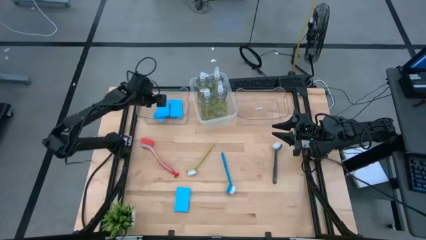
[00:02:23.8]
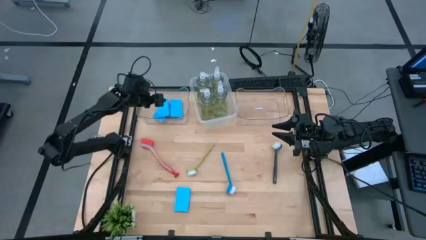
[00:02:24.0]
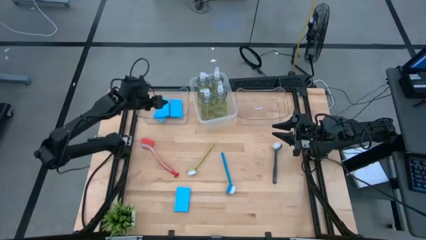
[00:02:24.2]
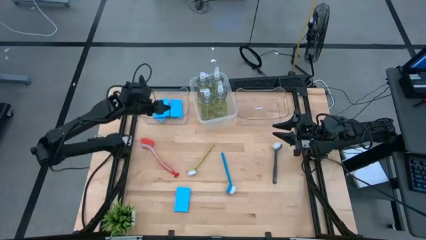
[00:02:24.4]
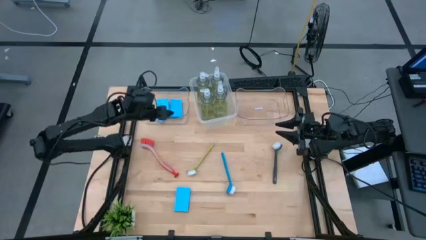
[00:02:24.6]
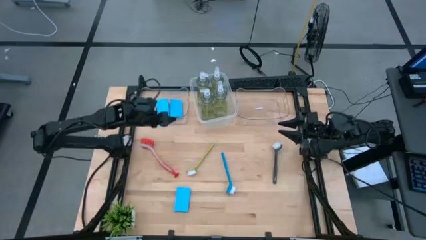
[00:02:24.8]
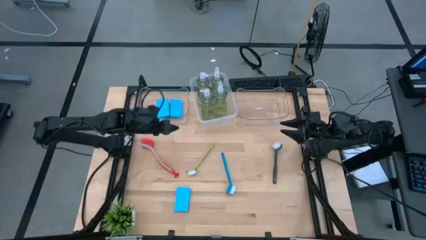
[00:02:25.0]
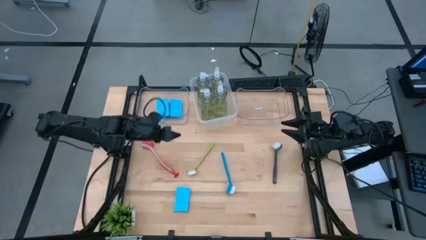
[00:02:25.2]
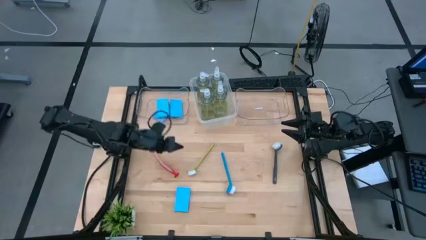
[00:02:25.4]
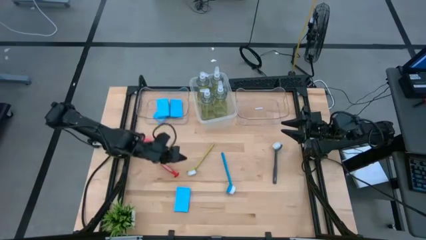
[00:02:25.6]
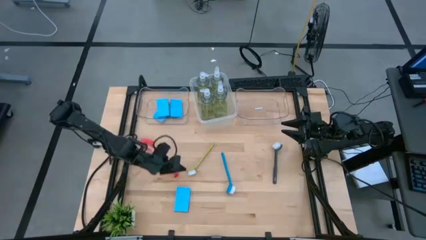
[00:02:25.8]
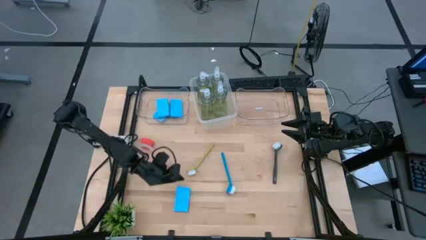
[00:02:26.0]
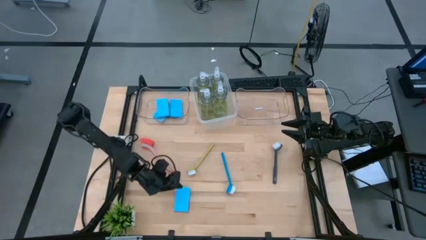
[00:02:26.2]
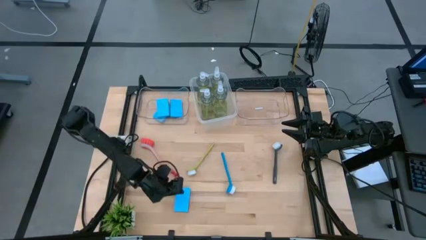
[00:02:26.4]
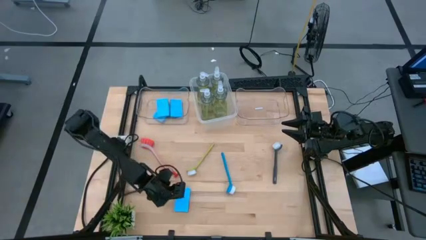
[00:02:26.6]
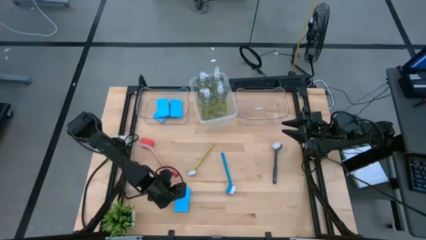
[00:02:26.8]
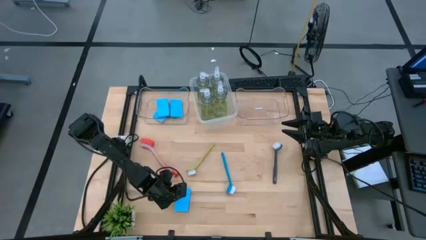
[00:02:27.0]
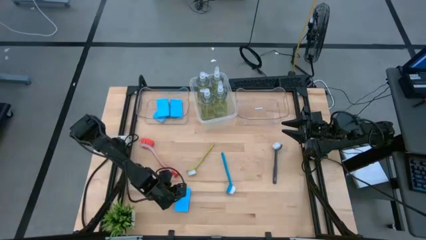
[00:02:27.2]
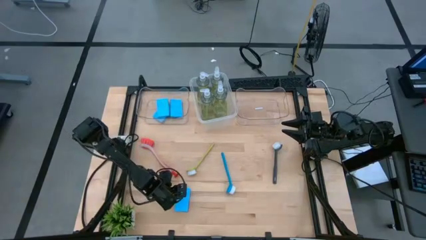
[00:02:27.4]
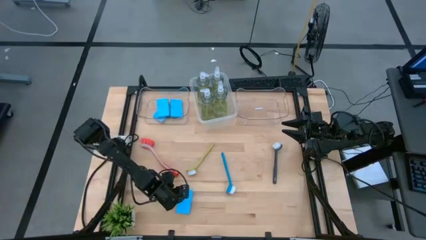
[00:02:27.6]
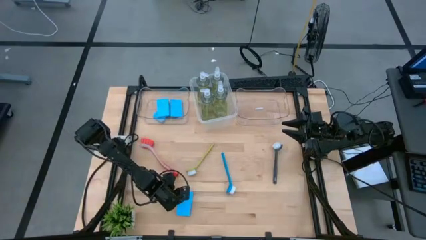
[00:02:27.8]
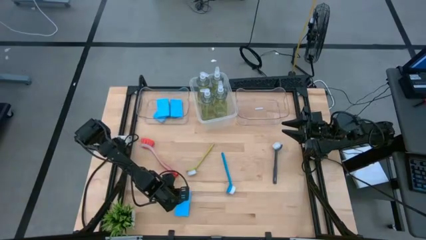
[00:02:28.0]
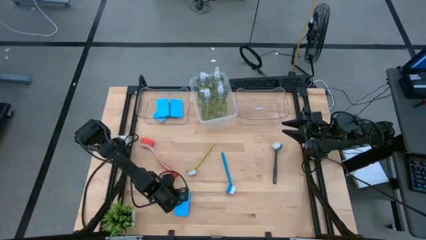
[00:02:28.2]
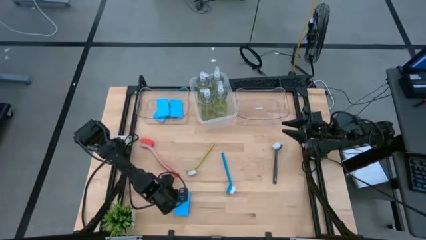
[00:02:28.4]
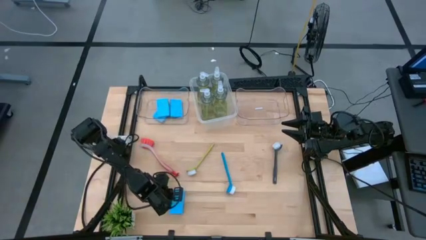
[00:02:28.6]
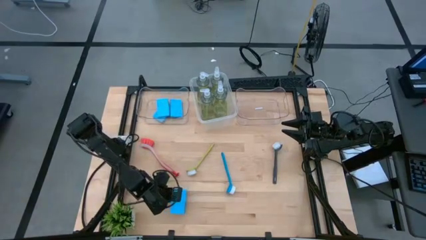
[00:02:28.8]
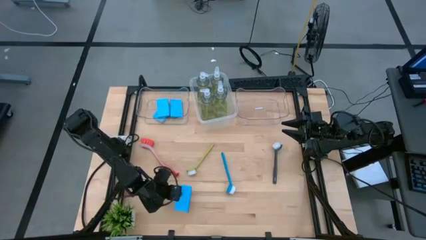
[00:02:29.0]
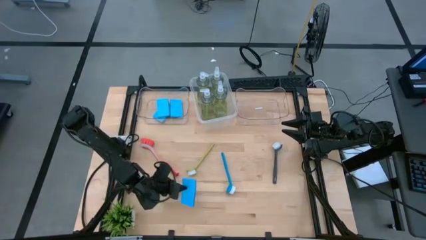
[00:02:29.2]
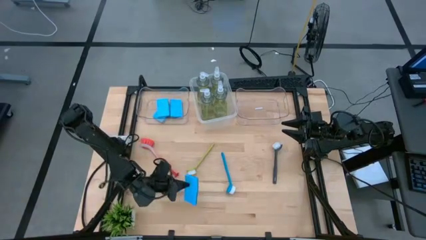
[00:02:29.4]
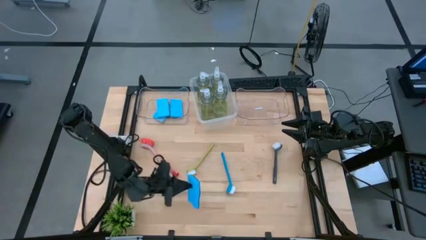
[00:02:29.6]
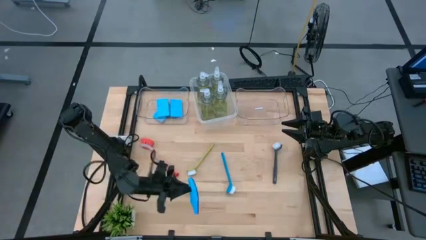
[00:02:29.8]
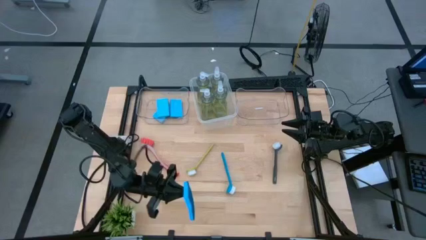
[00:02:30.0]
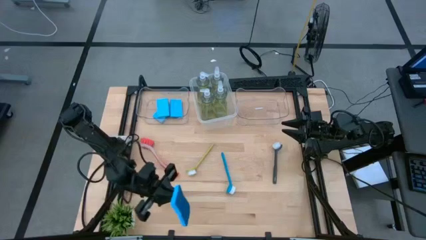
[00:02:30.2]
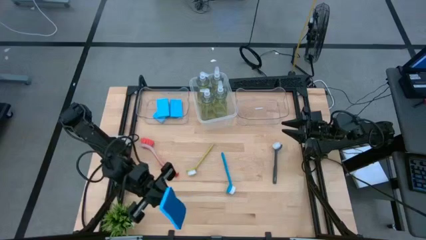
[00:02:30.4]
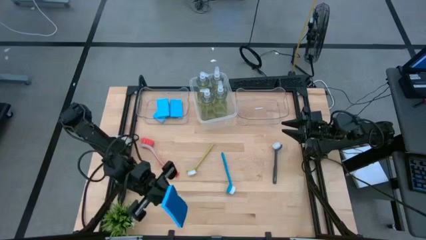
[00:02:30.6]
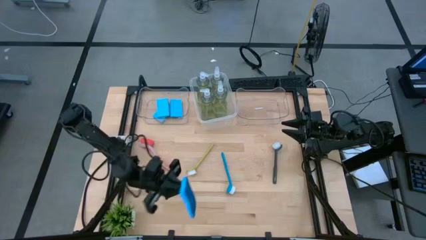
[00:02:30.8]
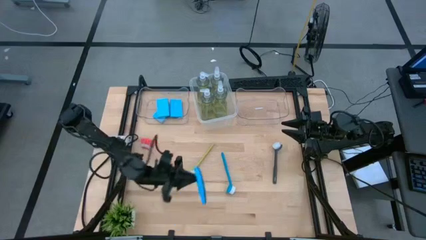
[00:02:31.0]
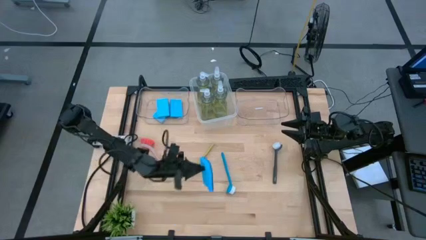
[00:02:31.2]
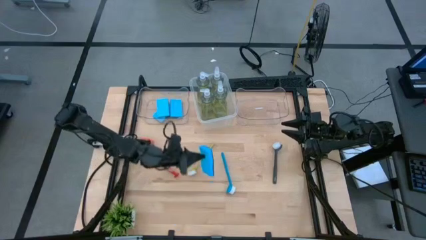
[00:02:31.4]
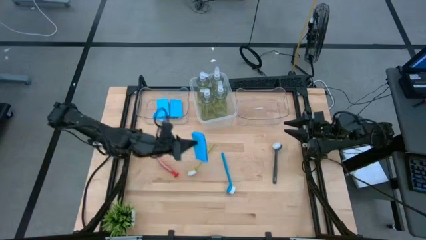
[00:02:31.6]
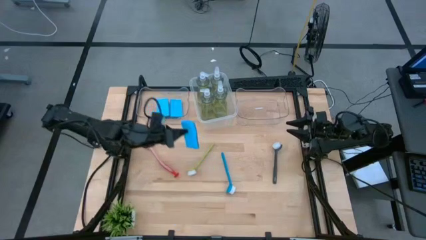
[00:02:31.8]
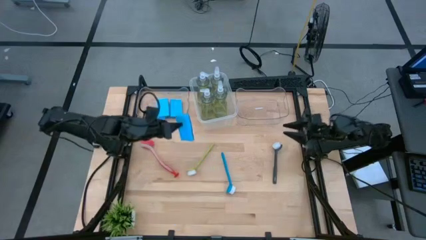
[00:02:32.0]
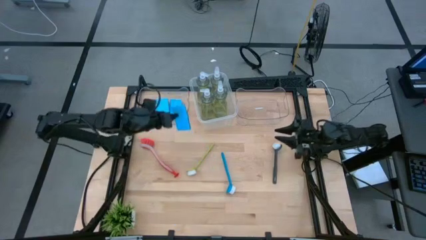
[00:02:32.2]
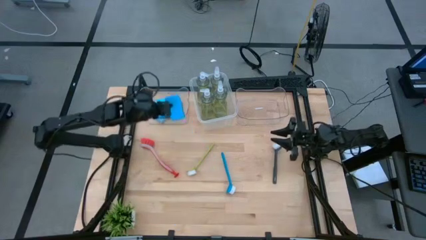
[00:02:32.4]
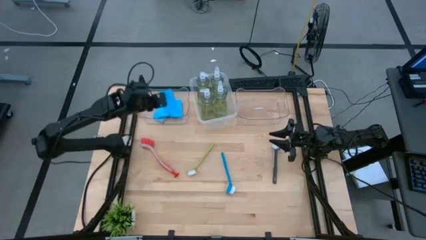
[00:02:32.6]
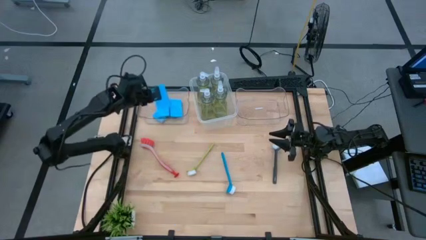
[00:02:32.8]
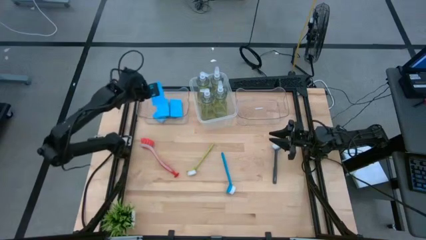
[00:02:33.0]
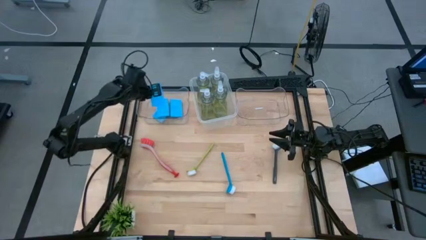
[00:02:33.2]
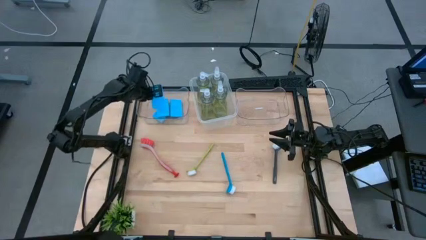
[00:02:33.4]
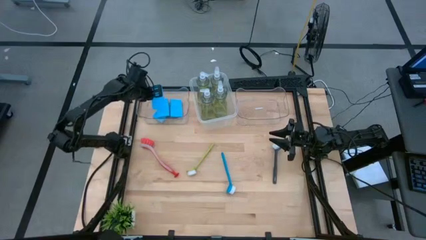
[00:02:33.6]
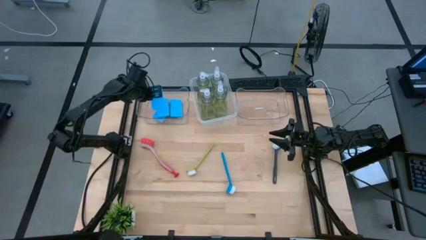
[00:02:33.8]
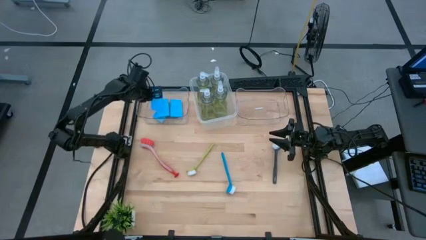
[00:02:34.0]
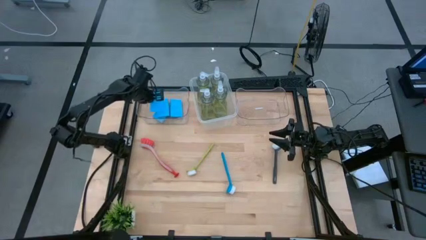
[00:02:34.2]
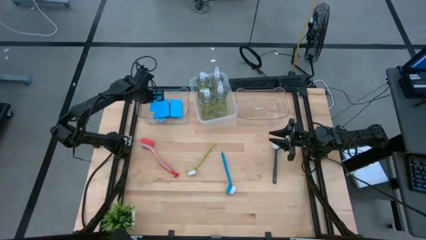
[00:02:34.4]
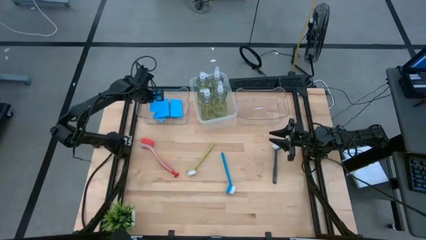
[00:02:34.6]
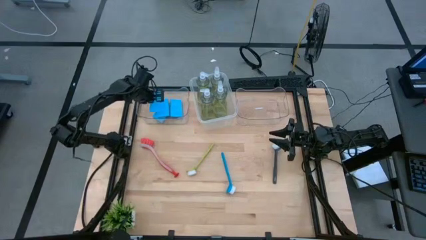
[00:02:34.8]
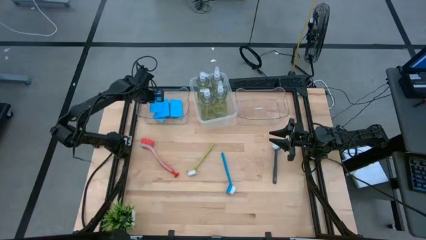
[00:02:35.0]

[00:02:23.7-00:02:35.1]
Task: Pick & Place Kitchen Sink Supplies
Put the blue sponge into the left transparent bin

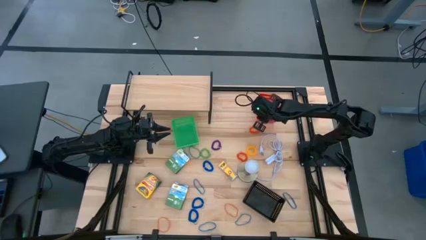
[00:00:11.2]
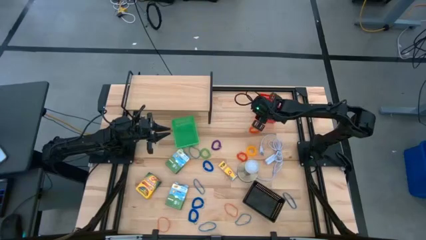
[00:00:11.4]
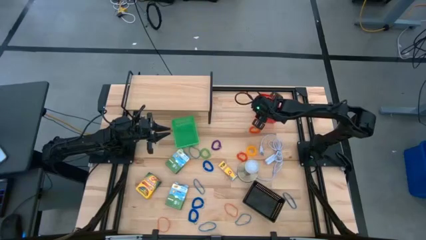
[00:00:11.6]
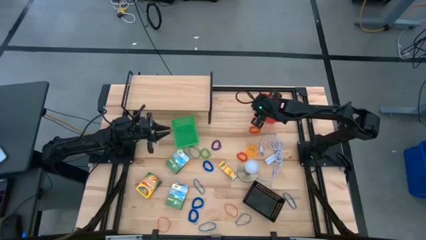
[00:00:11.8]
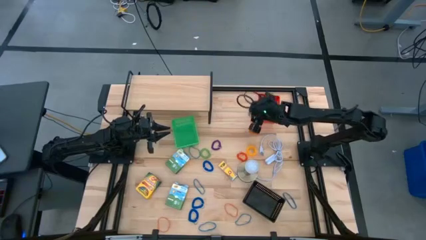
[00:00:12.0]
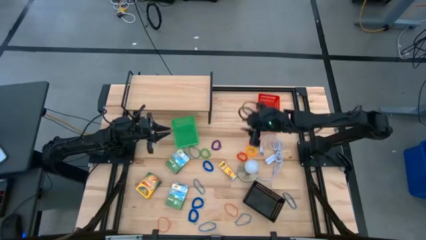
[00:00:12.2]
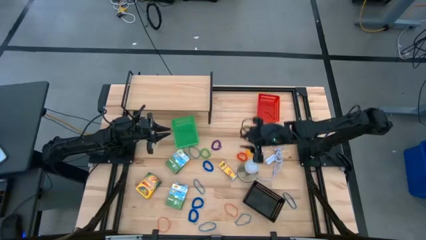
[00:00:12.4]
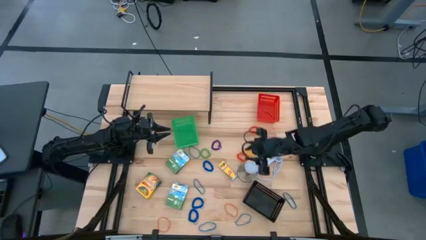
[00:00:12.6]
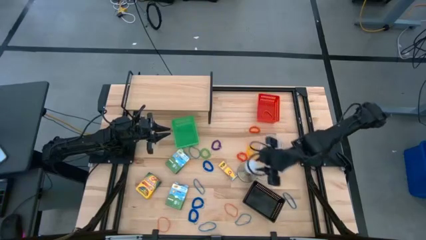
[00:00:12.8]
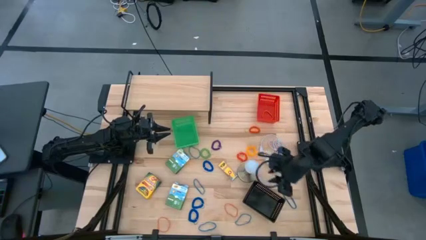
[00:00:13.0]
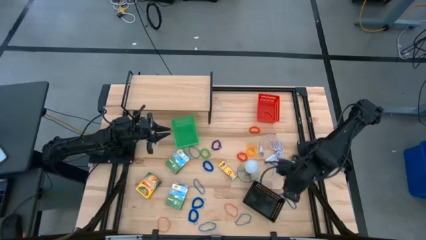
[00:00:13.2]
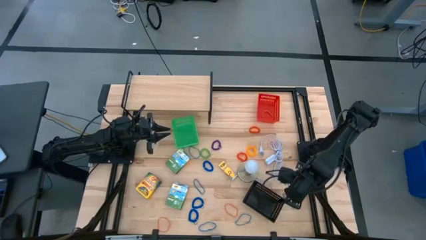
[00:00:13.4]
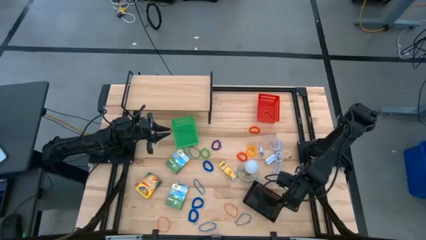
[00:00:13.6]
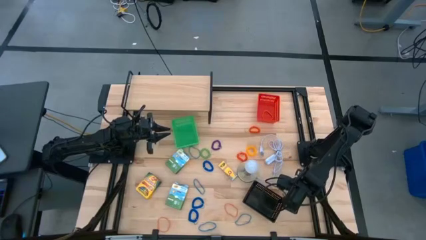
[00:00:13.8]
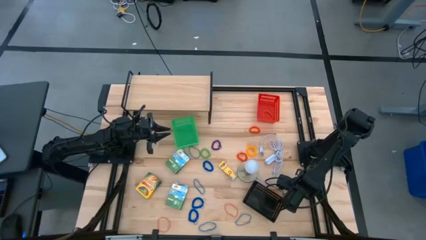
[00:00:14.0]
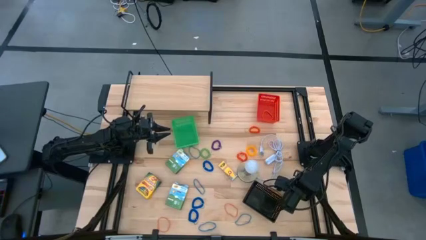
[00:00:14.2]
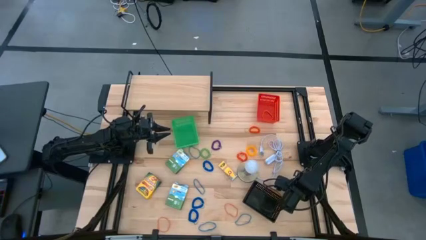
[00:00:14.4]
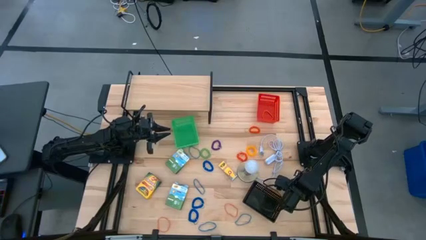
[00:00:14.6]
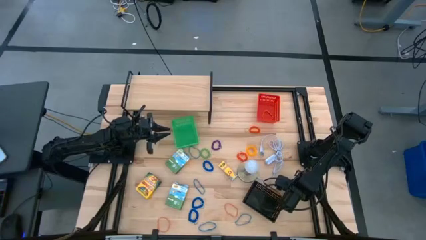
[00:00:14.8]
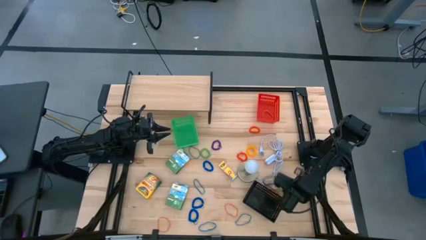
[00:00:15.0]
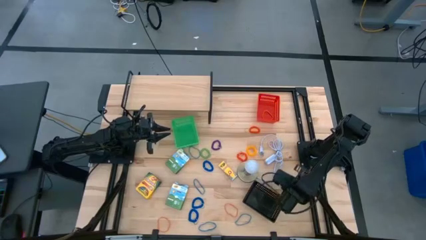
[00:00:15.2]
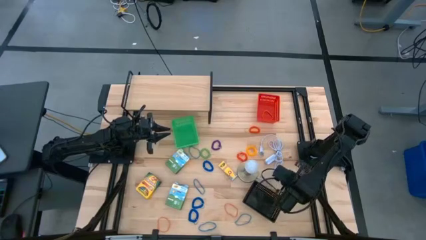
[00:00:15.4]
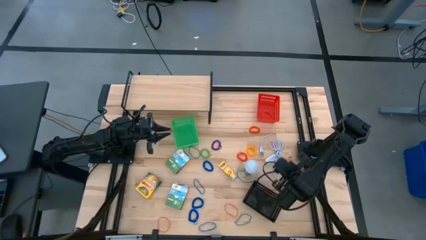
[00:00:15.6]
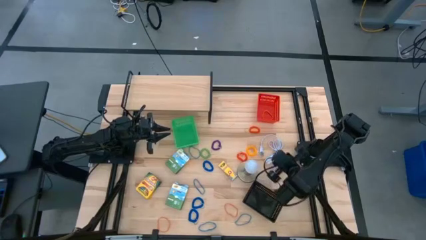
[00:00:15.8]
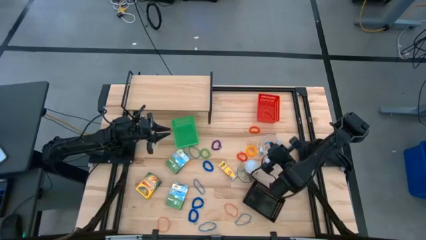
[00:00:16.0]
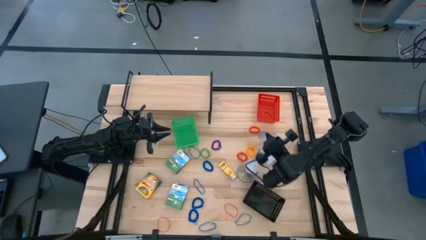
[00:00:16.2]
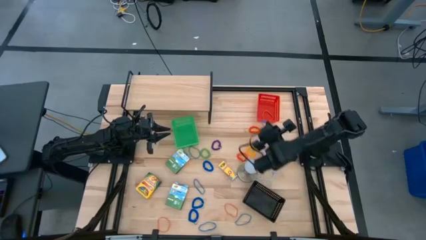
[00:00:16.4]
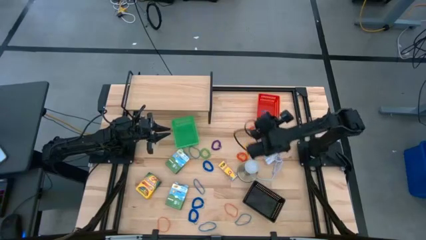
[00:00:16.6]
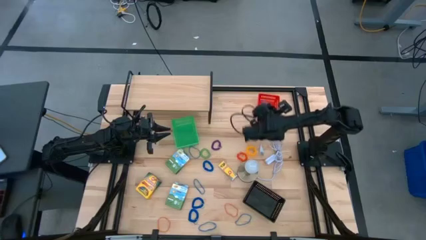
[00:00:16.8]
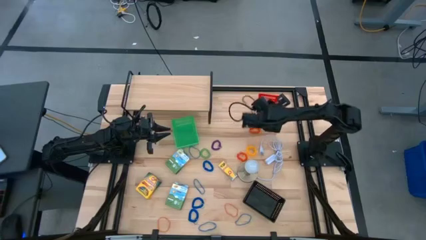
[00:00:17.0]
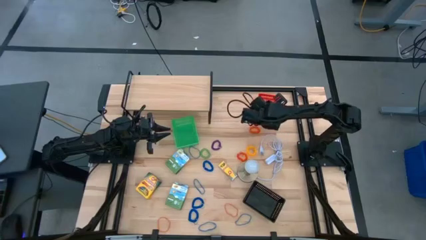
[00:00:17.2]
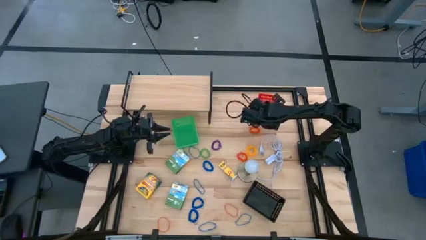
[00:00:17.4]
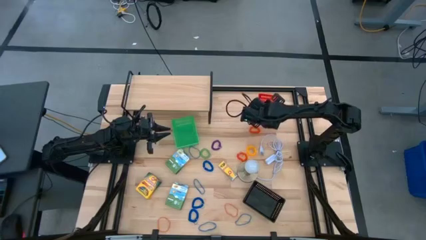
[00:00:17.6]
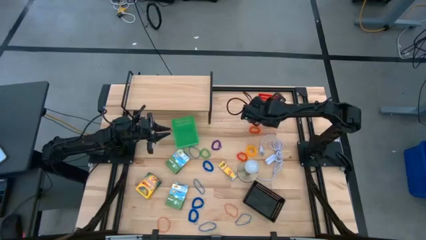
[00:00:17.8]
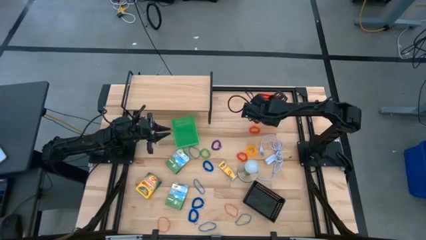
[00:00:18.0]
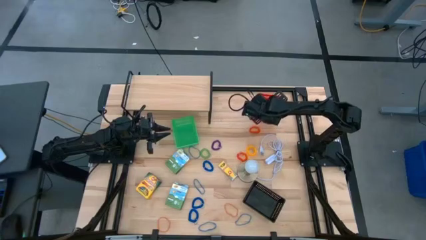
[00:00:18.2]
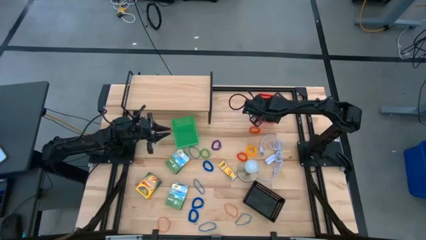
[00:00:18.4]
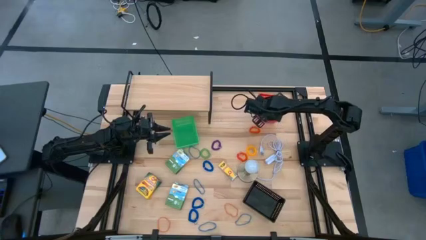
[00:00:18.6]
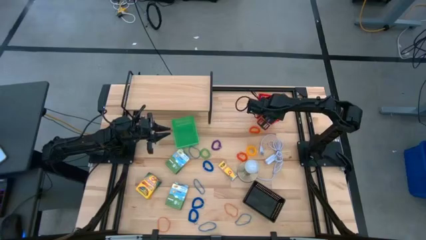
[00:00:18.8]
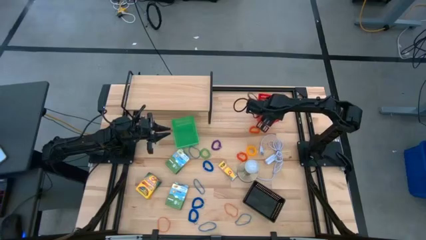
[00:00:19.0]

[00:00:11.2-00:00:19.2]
Task: Pick & Place Office Desk Supplies
Put the blue rubber band into the red basket
